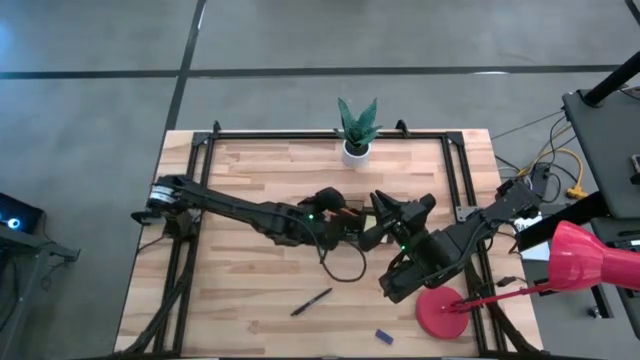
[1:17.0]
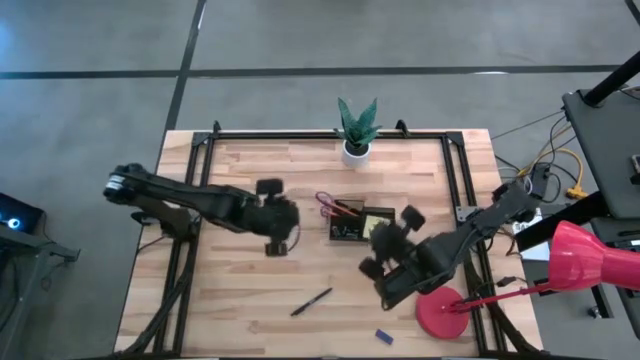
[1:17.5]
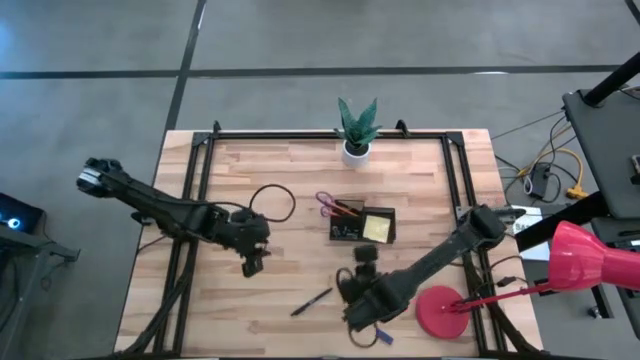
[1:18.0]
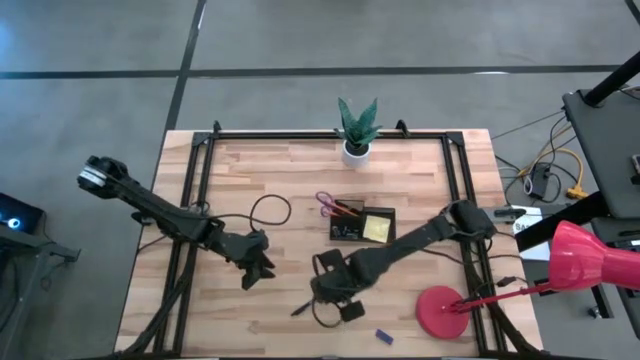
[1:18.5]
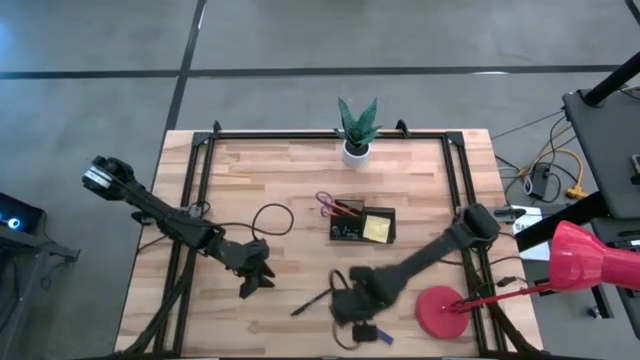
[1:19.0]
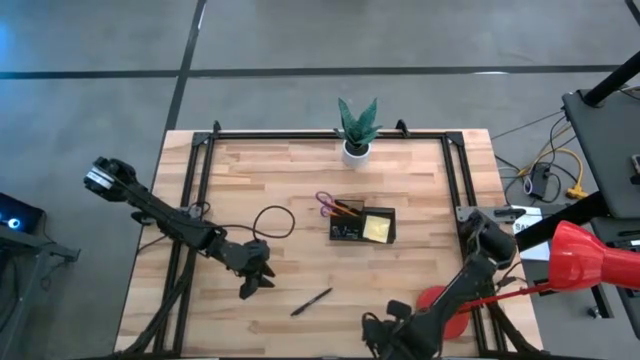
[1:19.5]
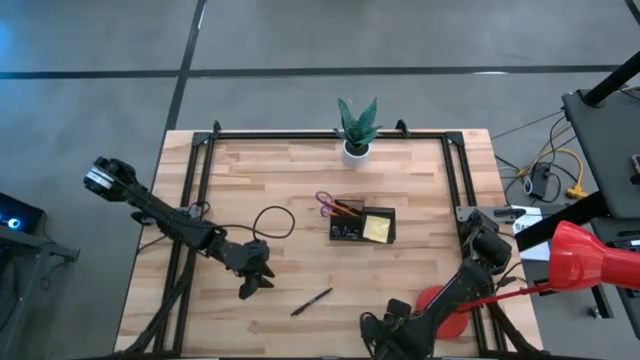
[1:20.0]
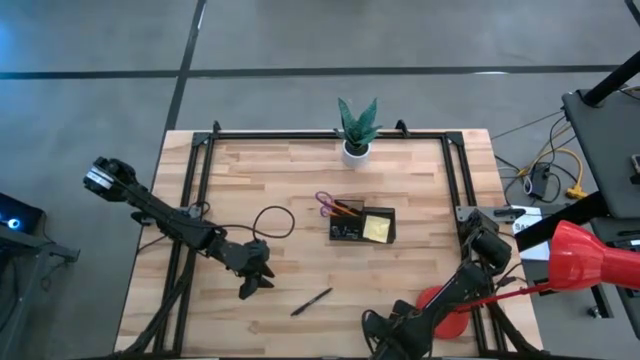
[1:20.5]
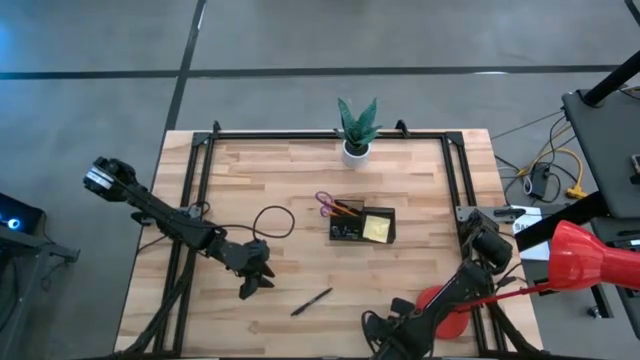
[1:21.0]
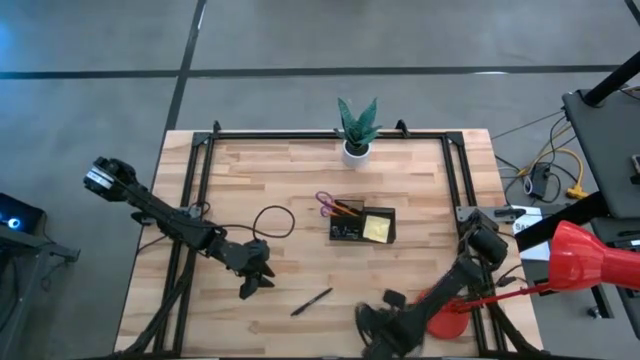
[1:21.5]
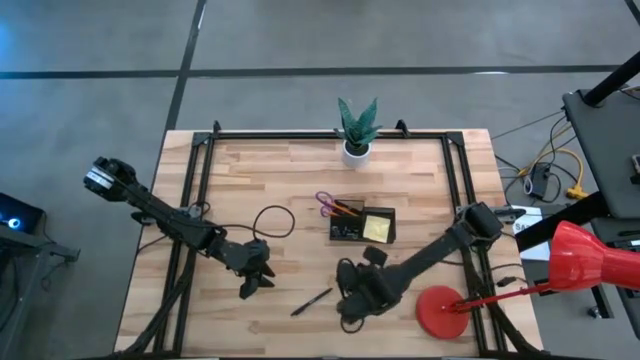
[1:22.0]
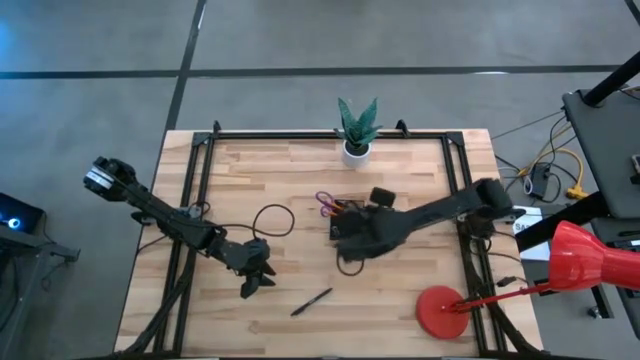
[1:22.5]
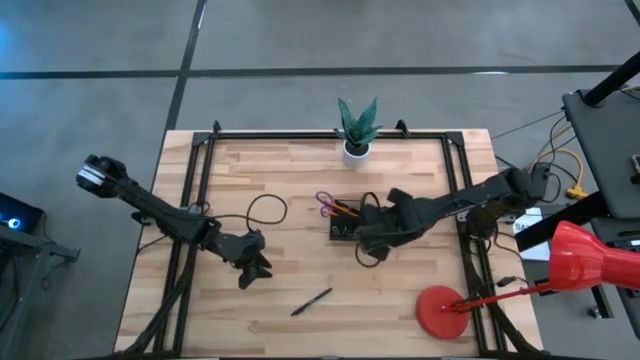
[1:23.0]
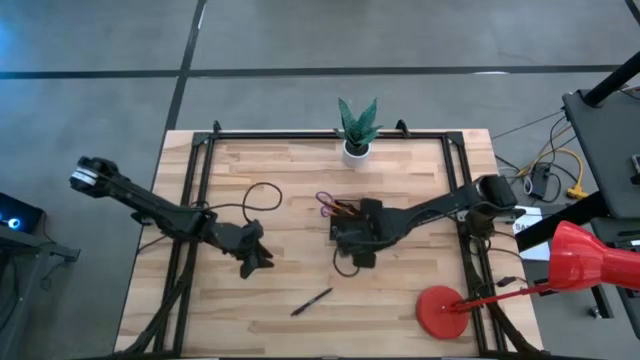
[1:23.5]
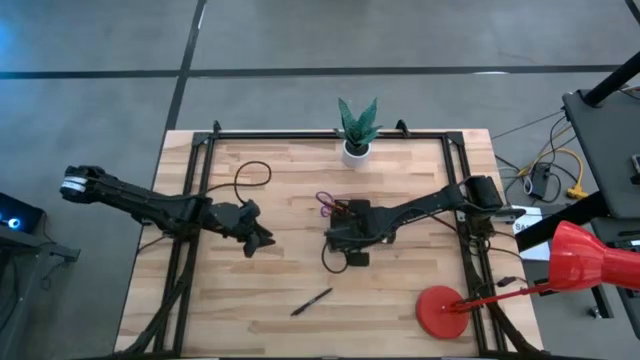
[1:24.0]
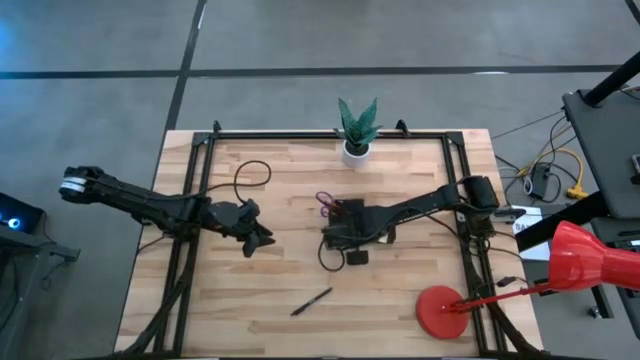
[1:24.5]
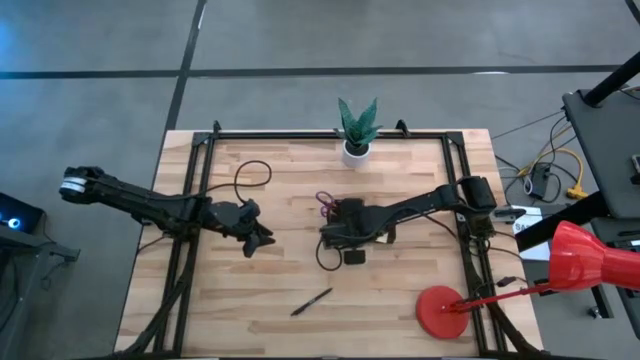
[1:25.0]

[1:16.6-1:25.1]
Task: Pick and place office supplies into organizer
Put the blue eraser into the black organizer

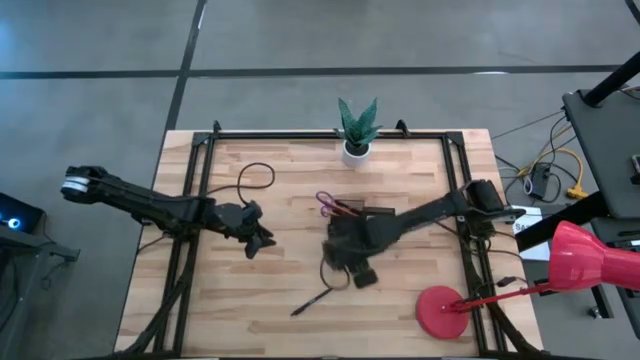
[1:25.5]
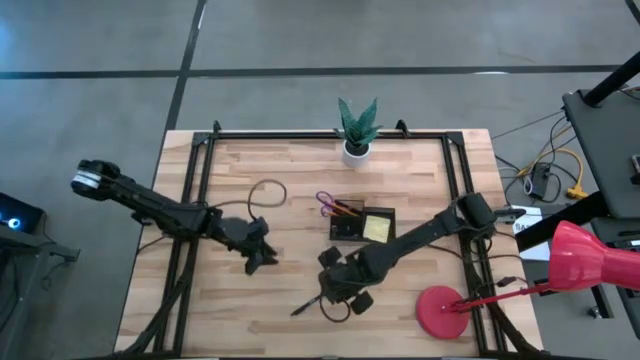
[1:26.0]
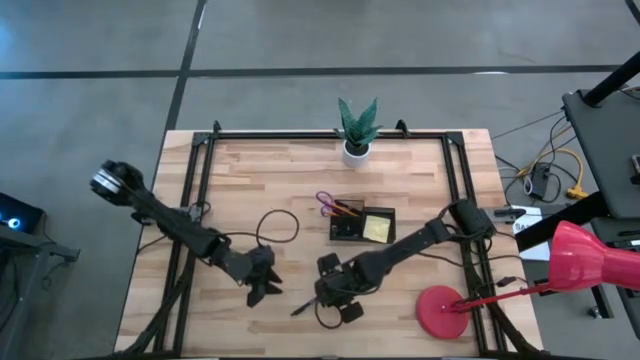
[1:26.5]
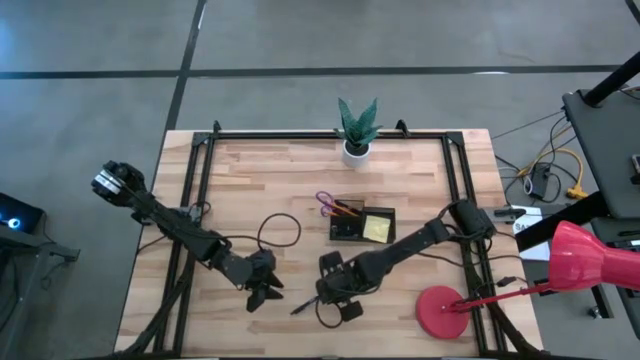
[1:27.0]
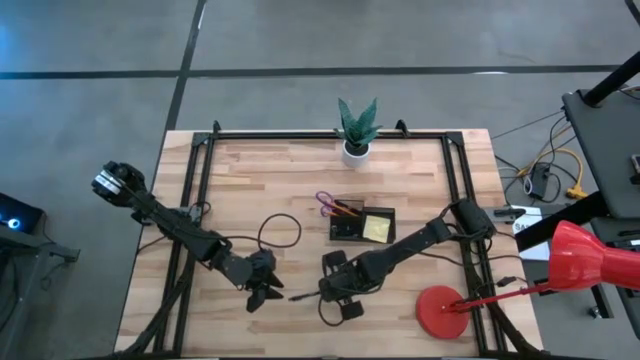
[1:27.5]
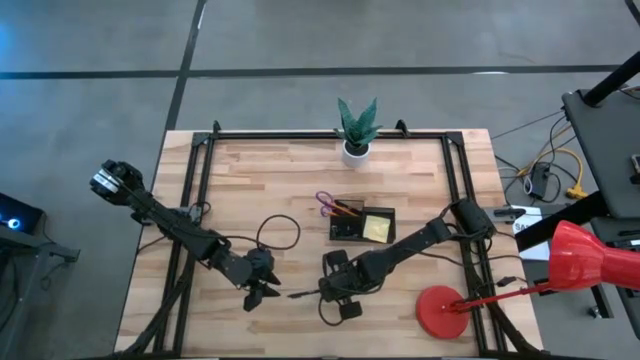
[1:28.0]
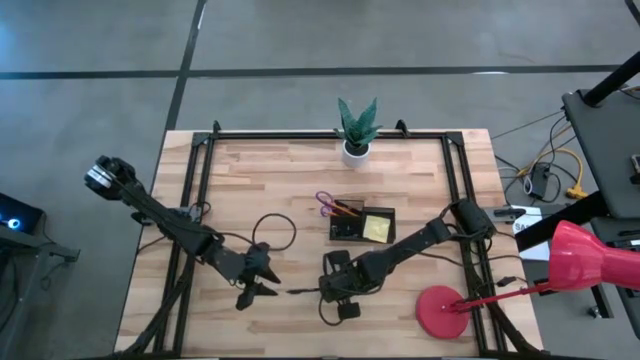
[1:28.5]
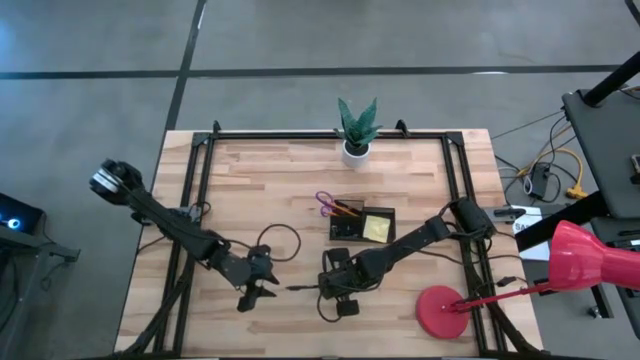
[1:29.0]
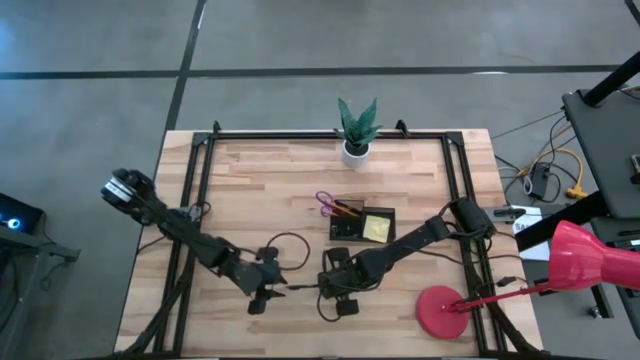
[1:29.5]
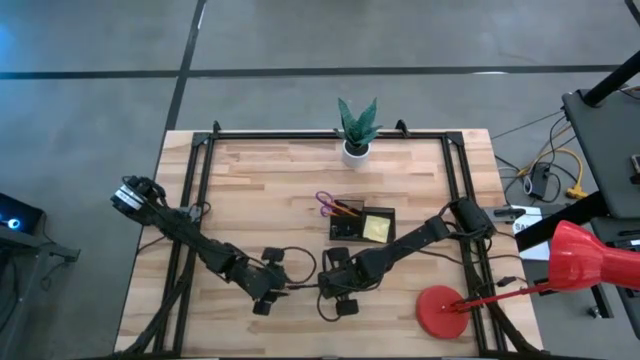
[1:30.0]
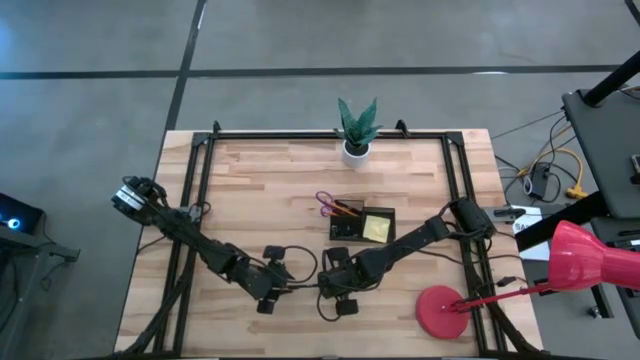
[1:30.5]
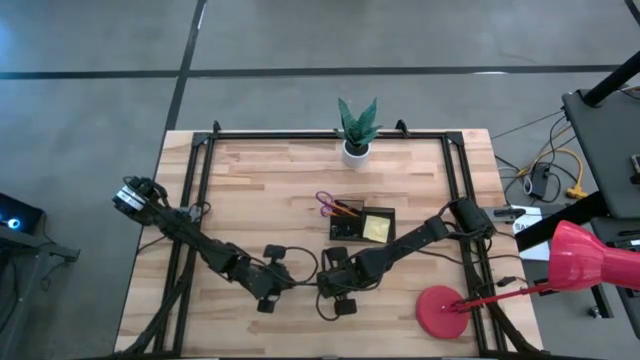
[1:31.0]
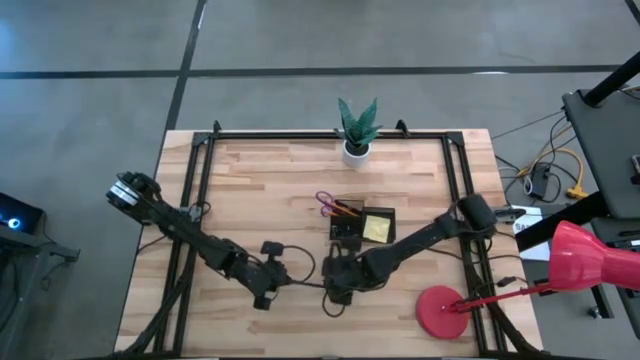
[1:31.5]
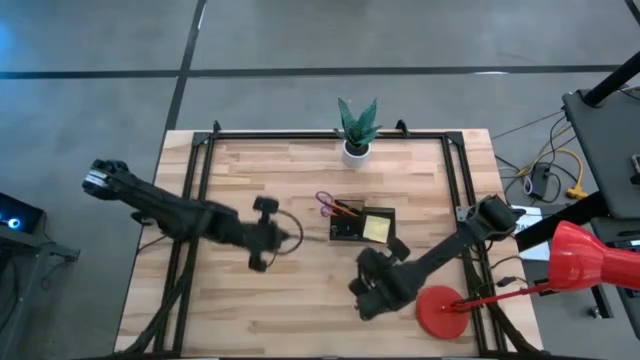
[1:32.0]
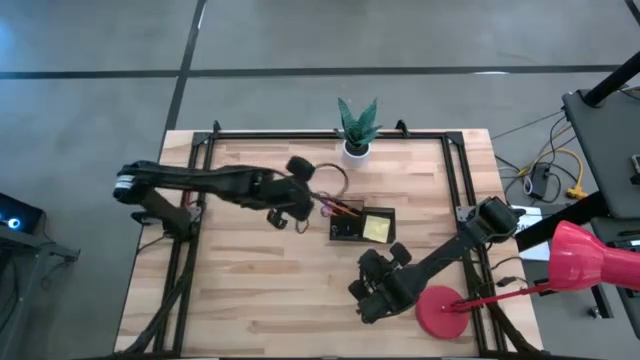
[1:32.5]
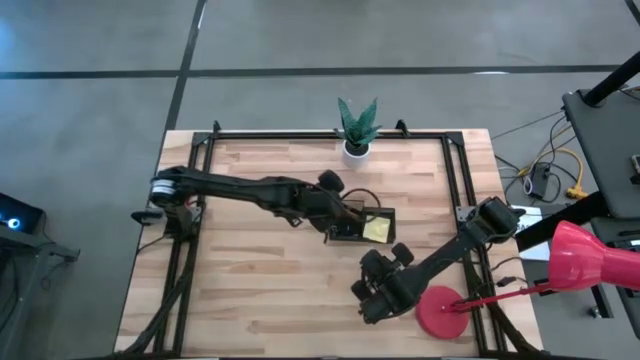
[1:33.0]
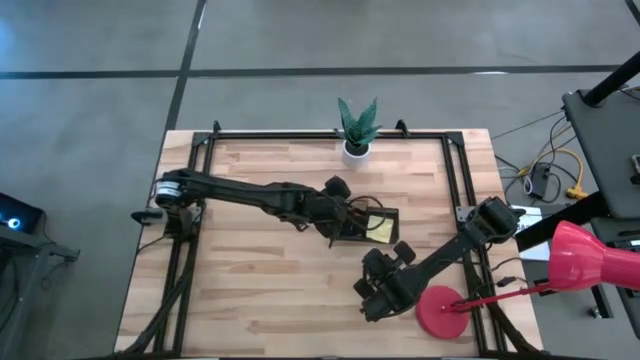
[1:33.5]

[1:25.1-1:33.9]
Put the black pen into the black organizer

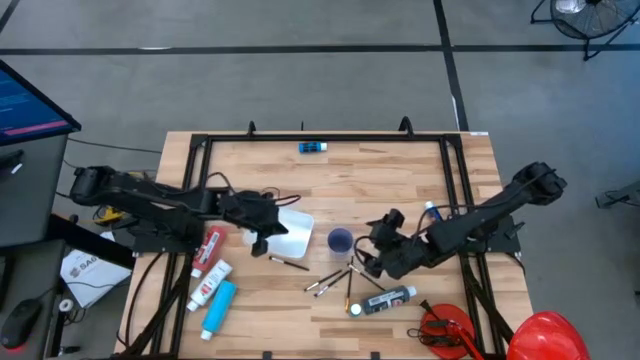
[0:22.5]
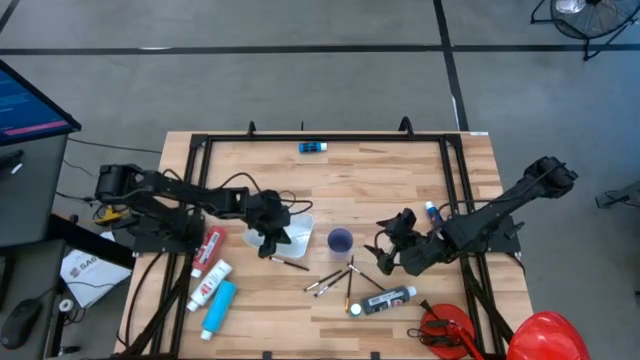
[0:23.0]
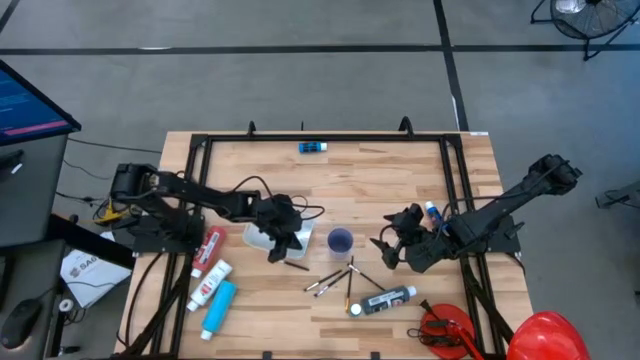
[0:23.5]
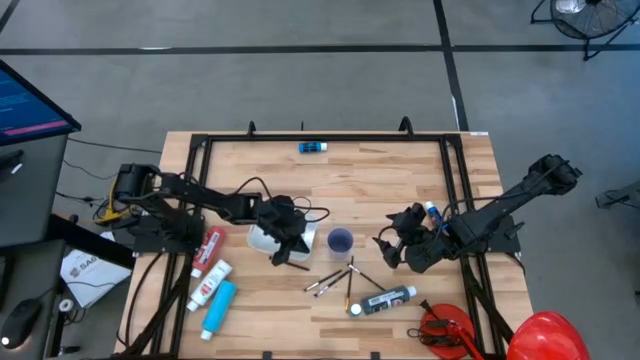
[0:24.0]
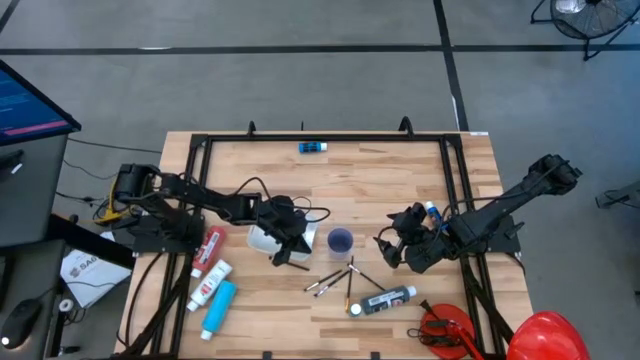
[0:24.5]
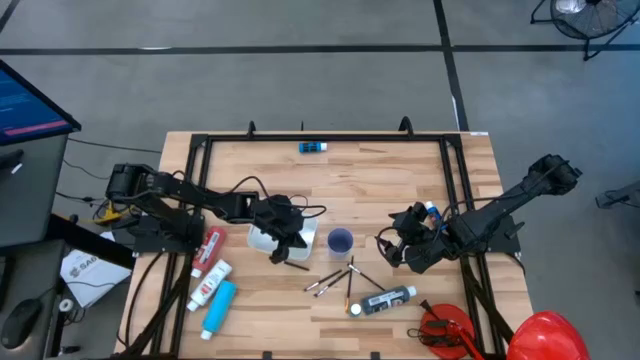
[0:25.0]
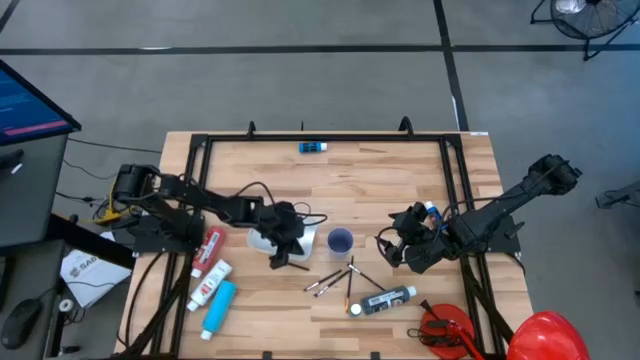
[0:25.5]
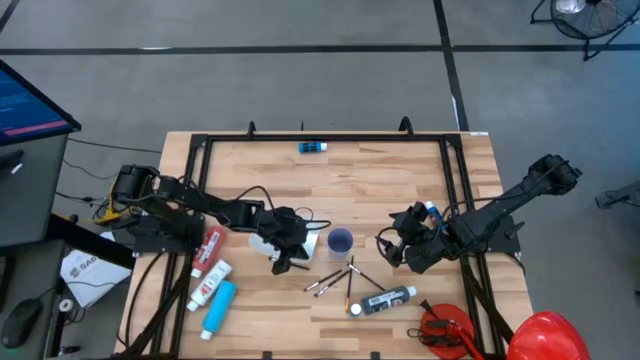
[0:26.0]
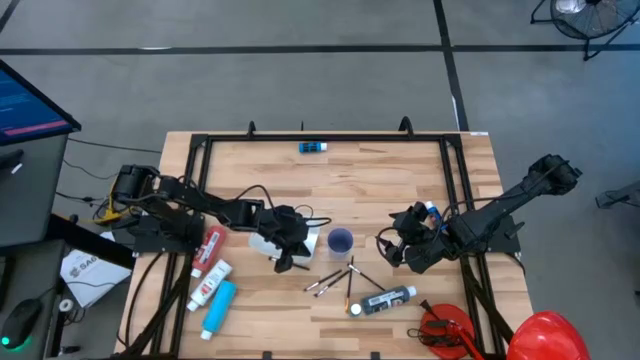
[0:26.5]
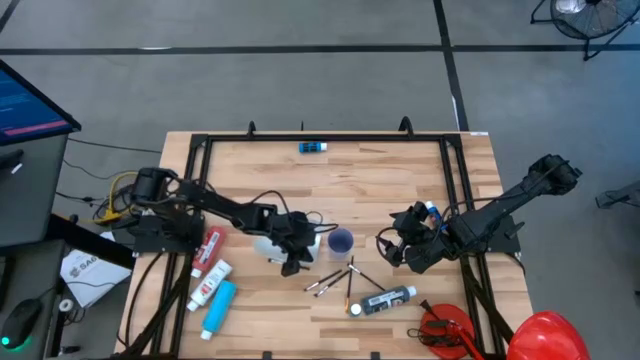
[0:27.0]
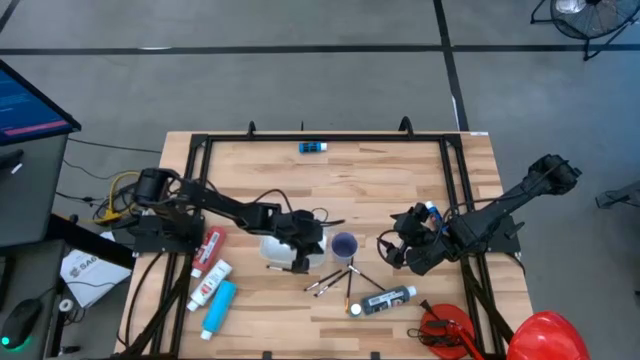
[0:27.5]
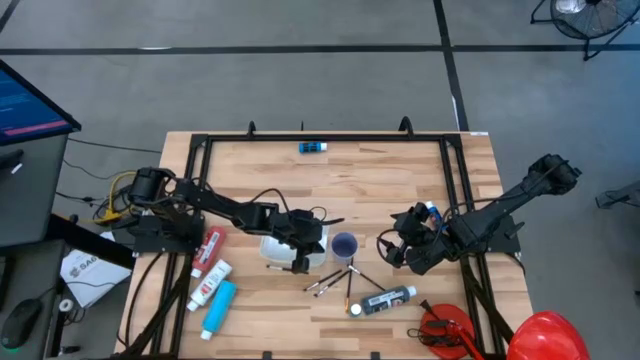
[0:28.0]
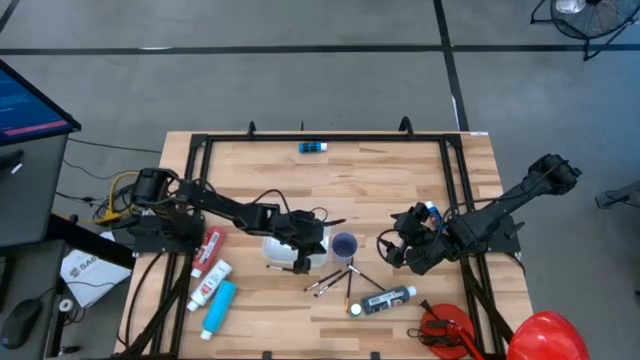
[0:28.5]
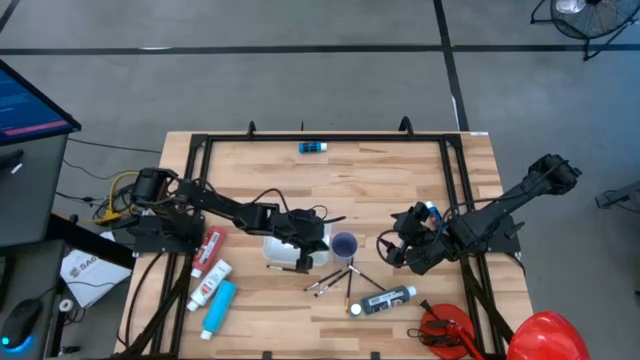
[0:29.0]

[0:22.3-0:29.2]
Task: Pick & Place Paint Supplies
Adjust the white bin
